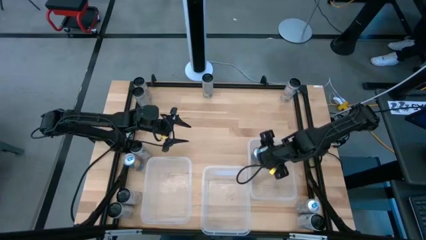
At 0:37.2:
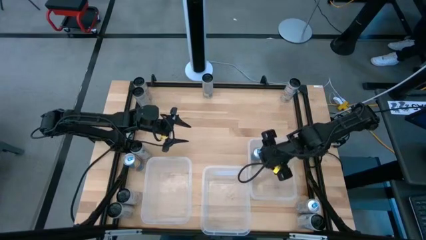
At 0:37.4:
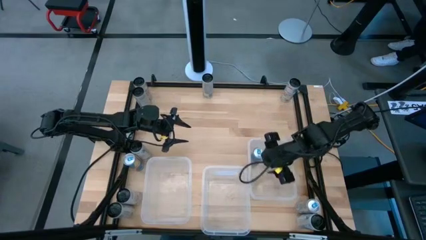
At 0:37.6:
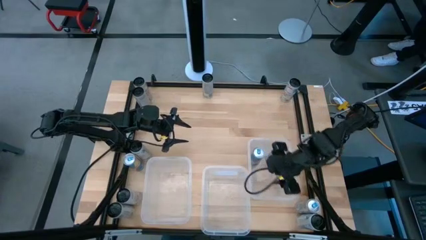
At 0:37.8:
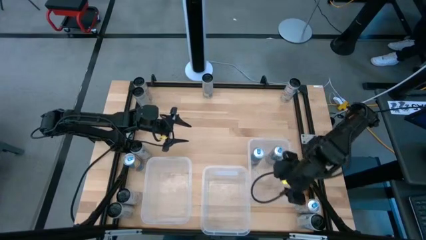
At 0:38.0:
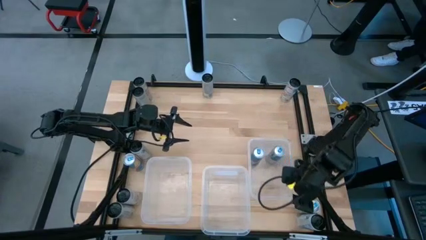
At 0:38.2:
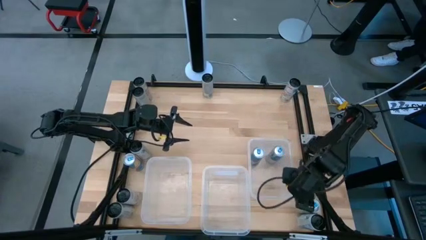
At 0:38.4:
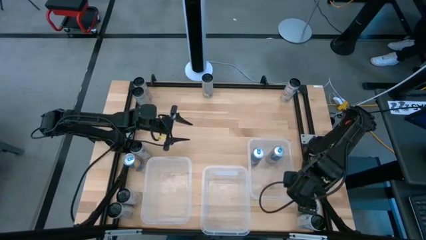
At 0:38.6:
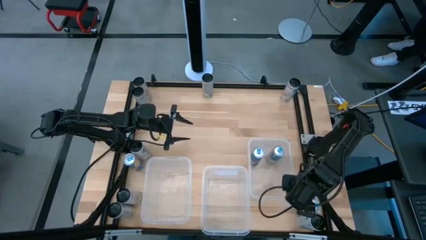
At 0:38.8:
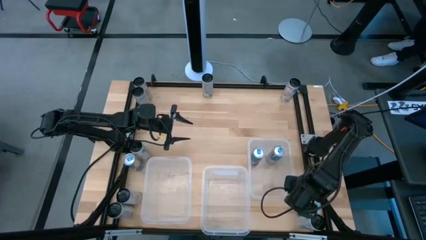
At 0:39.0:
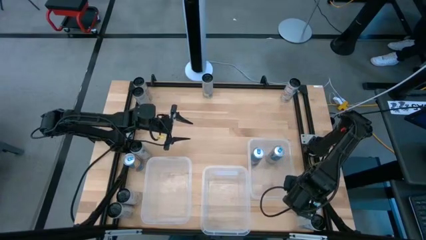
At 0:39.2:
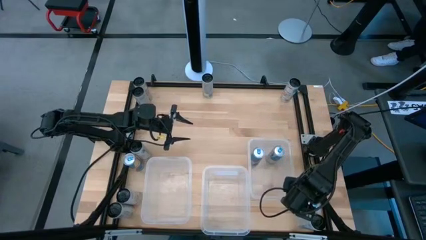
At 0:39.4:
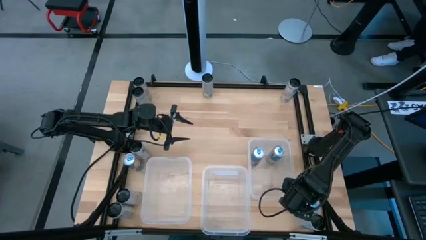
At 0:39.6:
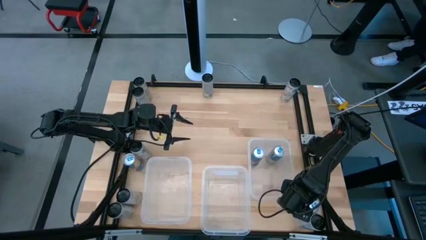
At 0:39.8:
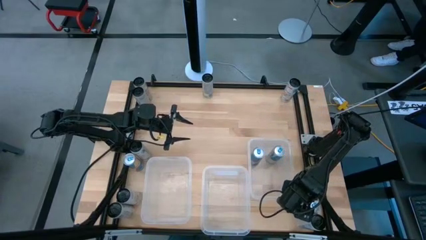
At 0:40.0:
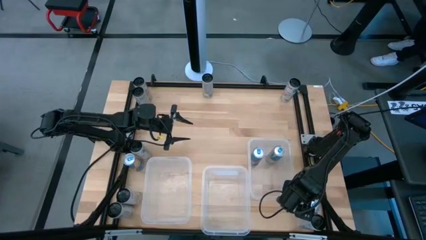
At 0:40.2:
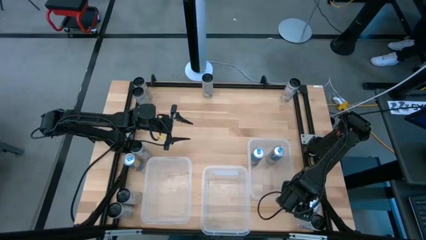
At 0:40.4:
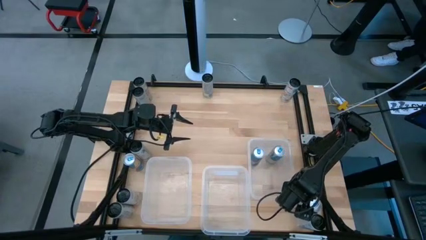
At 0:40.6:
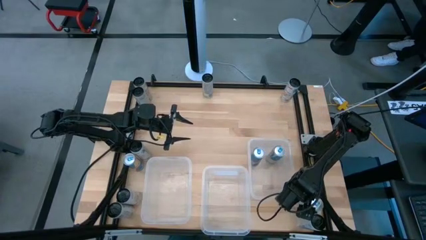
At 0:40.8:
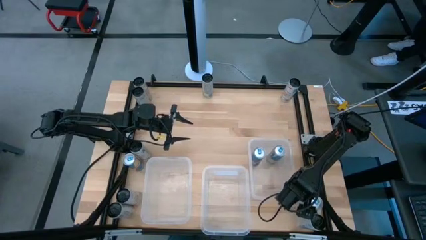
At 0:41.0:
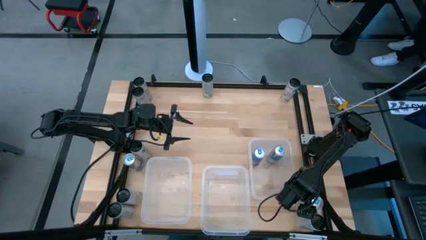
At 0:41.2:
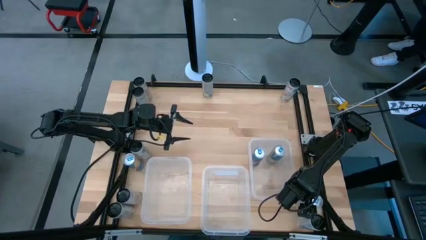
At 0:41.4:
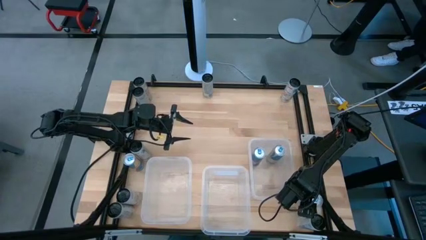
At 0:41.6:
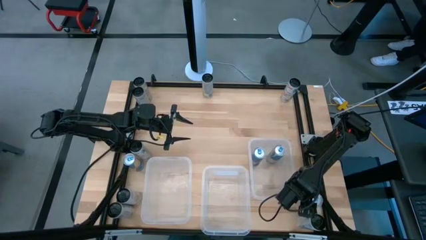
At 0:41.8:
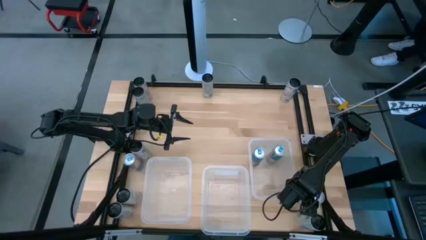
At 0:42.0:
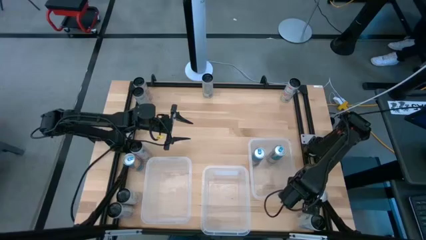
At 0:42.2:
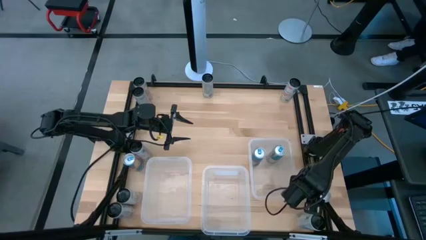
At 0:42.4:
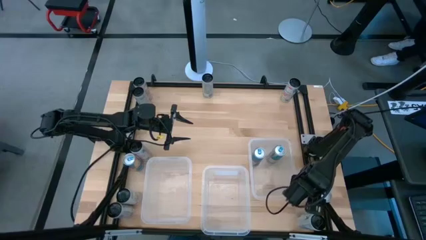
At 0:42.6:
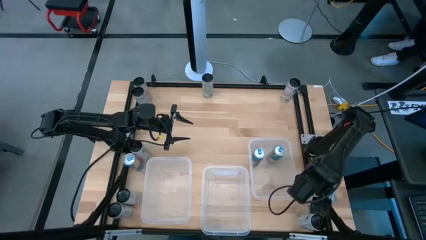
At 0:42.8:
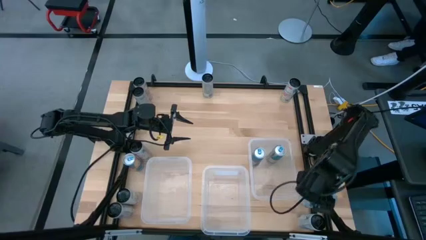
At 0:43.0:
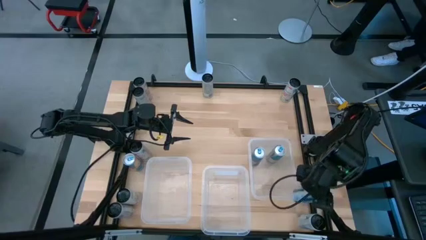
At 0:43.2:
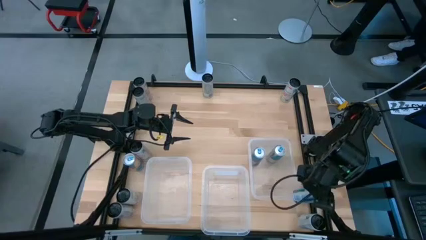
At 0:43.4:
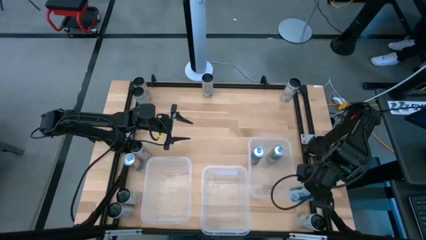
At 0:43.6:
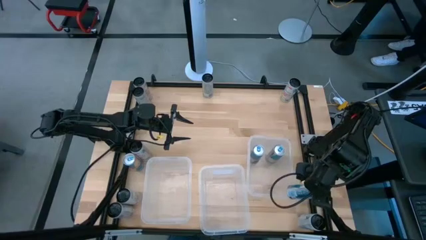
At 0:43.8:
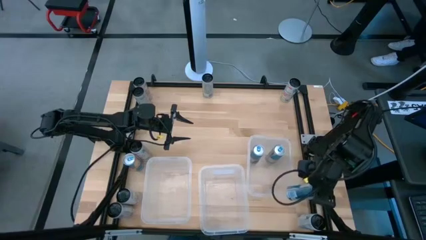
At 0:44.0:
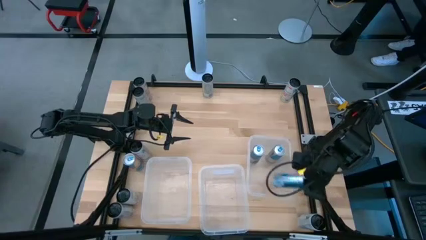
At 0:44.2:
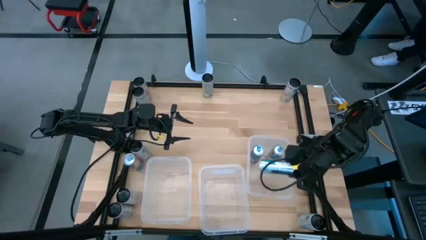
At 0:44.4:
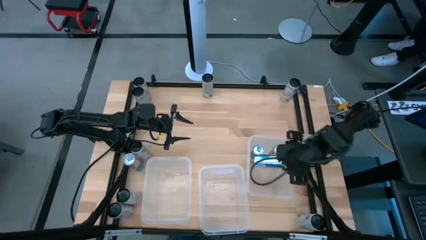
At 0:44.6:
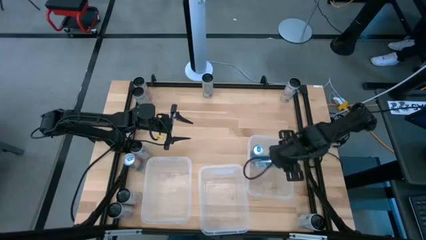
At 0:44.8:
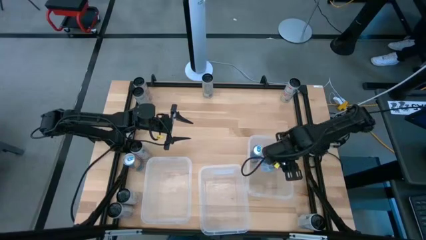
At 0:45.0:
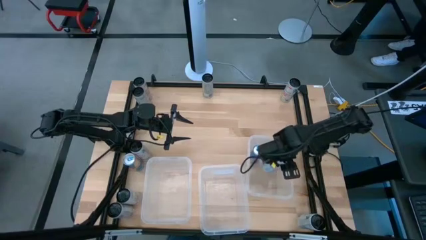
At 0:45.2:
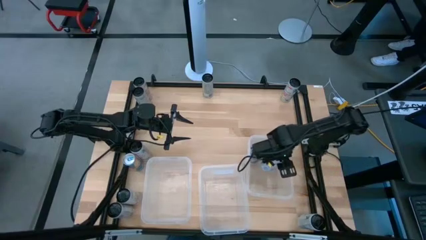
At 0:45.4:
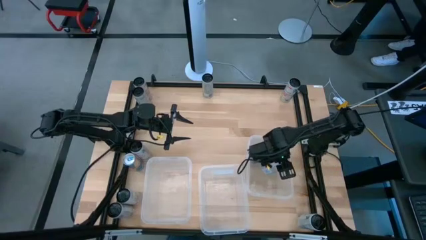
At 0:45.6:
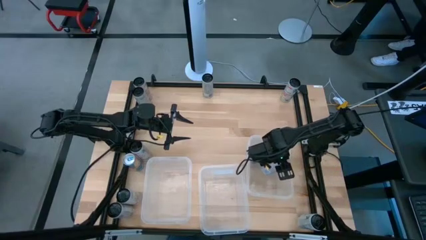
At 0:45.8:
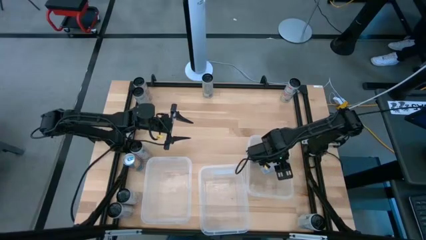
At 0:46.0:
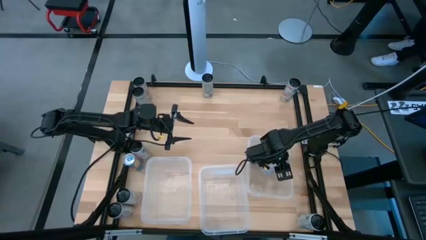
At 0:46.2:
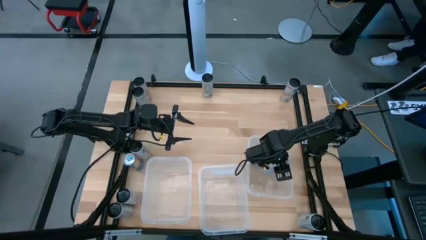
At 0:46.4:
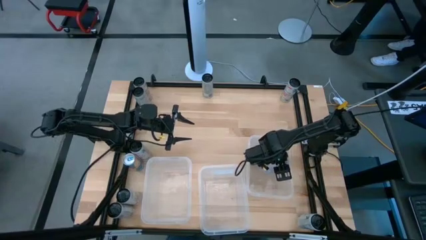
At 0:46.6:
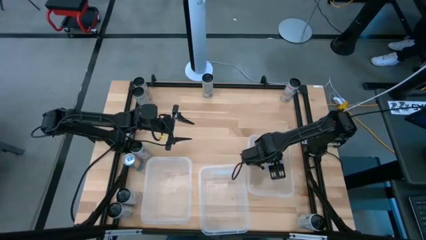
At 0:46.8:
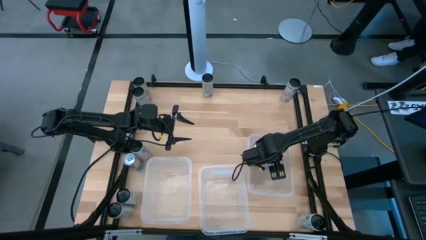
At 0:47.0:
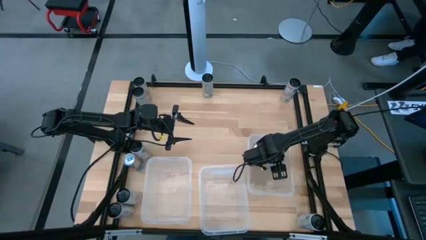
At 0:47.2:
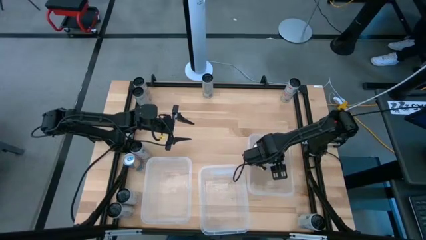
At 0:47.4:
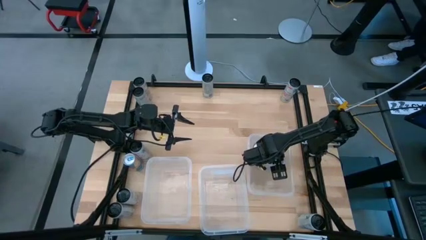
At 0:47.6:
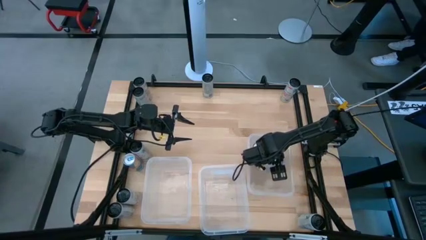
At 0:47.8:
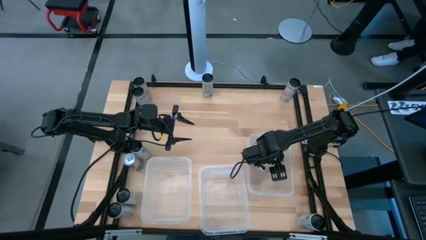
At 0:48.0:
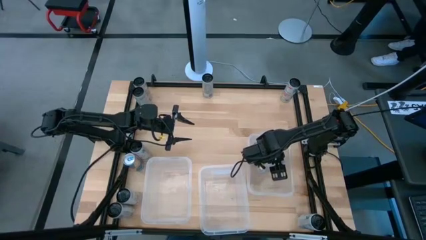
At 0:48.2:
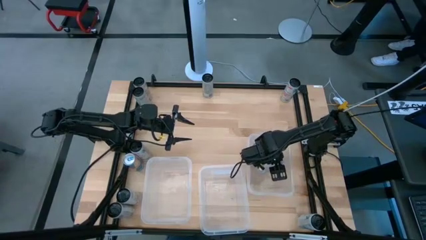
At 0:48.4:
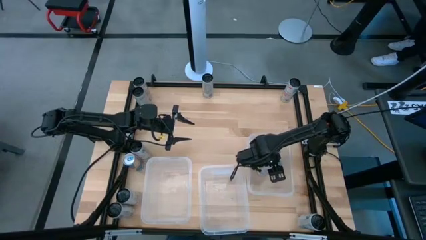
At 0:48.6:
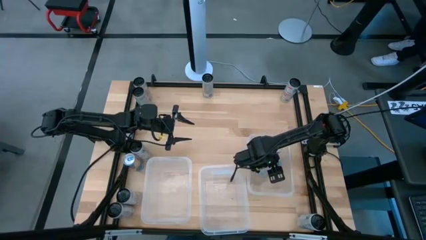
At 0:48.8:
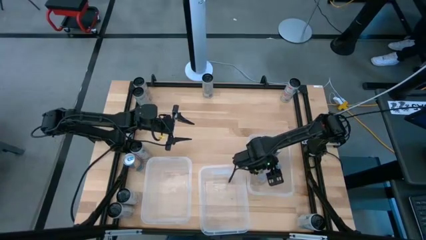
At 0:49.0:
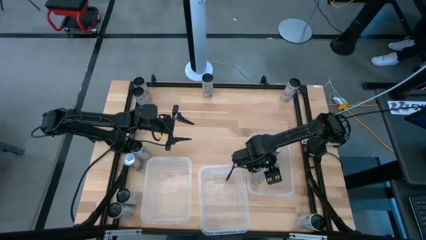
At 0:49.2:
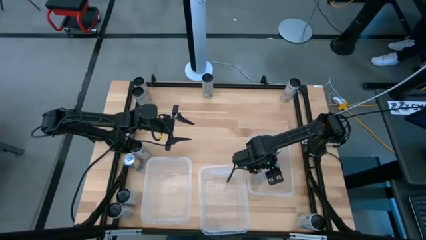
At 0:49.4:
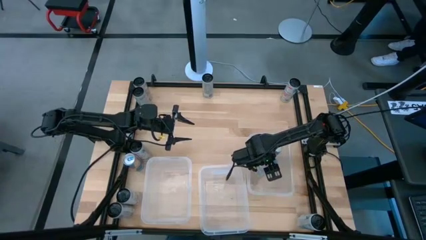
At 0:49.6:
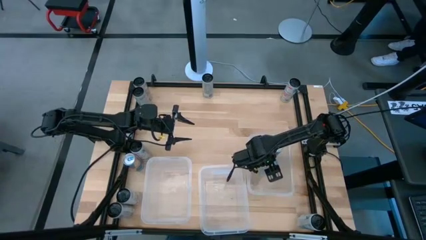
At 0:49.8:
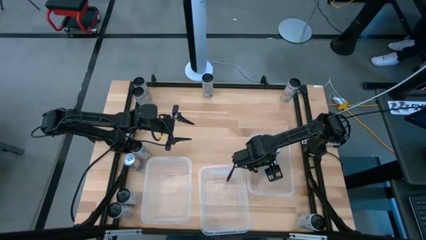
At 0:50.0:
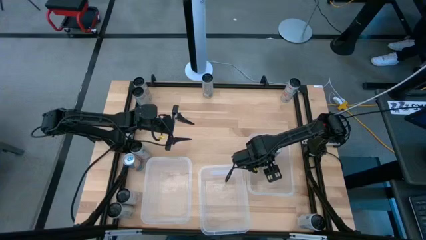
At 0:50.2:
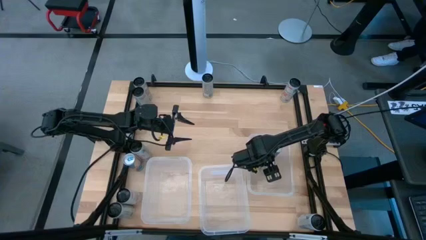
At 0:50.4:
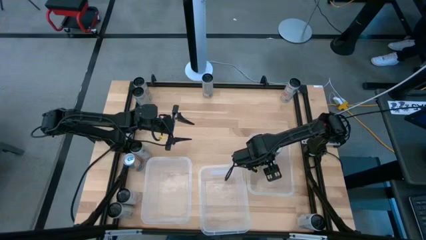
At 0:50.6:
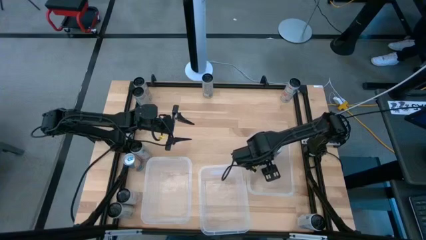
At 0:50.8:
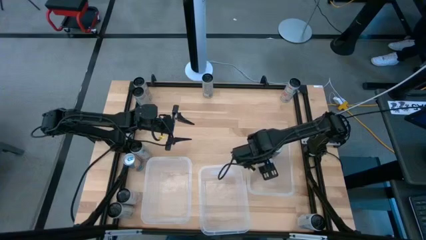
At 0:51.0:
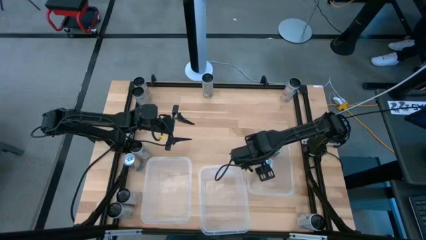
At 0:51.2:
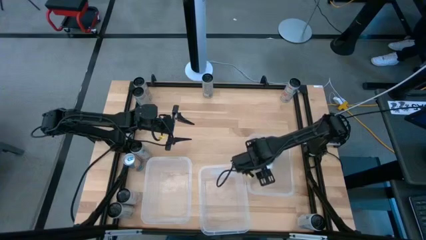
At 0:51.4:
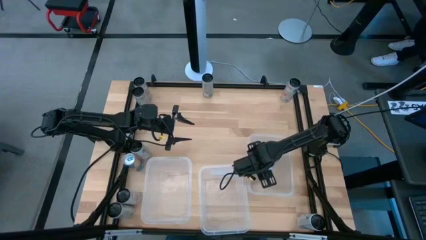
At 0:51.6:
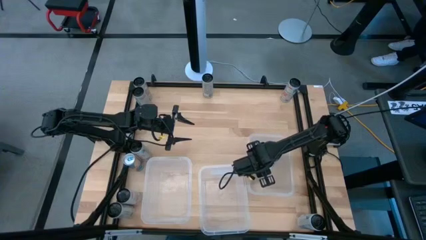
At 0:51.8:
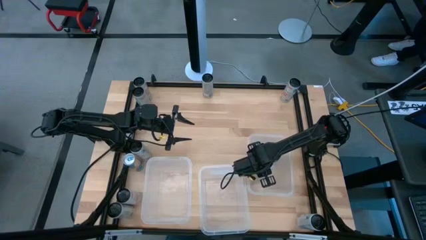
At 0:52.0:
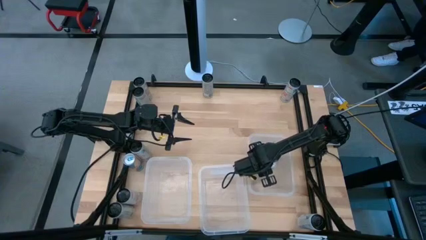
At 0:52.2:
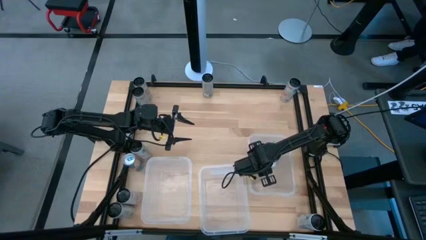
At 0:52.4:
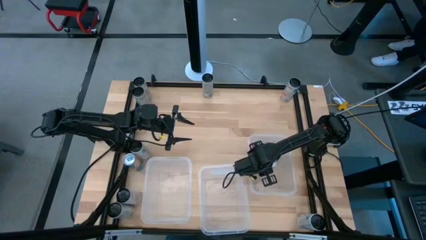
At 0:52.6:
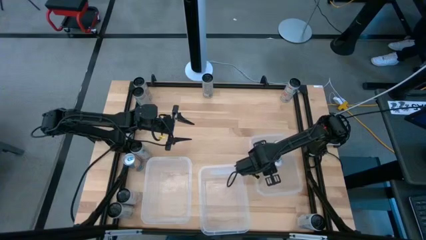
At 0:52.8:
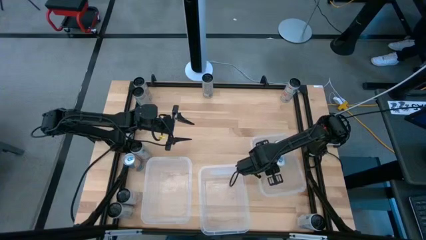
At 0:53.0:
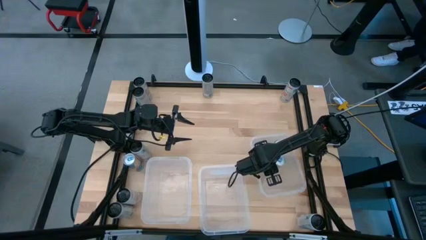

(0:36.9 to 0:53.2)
Task: Sort soda cans
Put the bottom blue soda can into the right transparent bin
